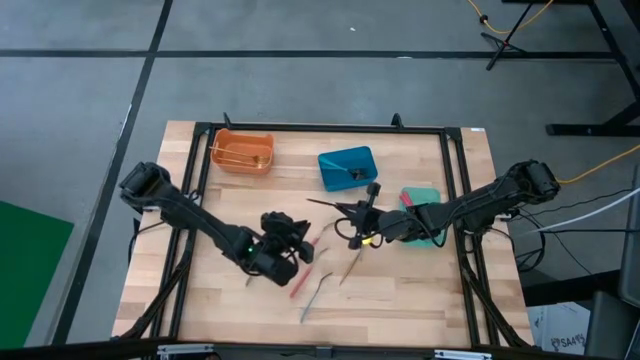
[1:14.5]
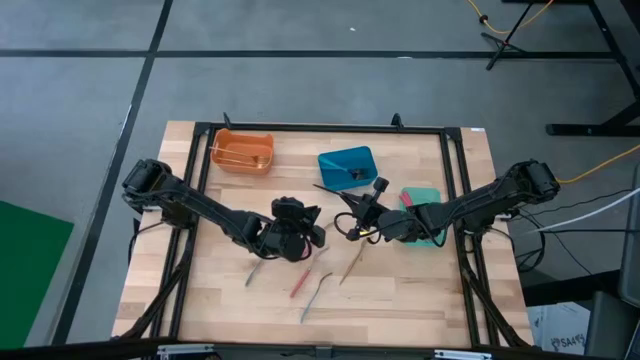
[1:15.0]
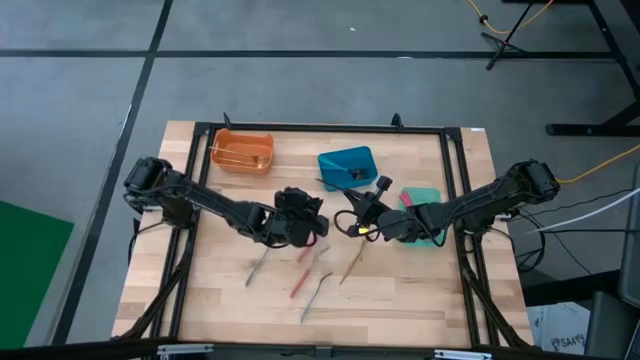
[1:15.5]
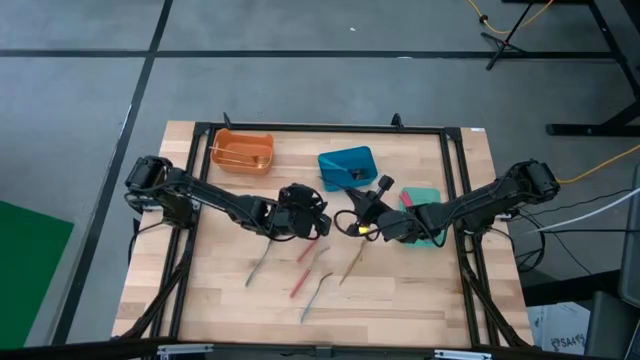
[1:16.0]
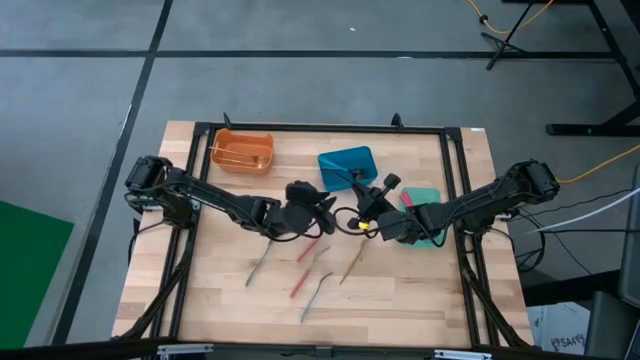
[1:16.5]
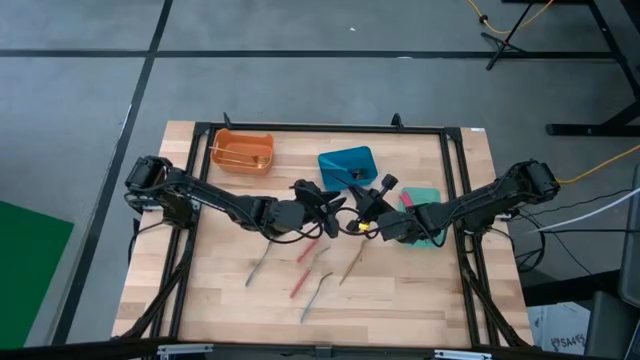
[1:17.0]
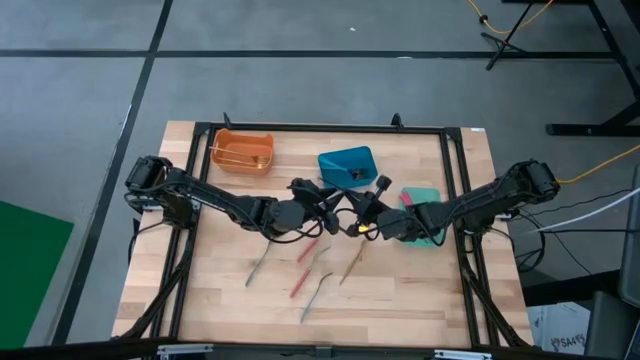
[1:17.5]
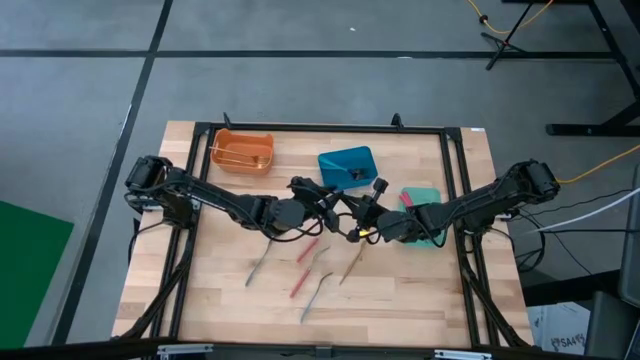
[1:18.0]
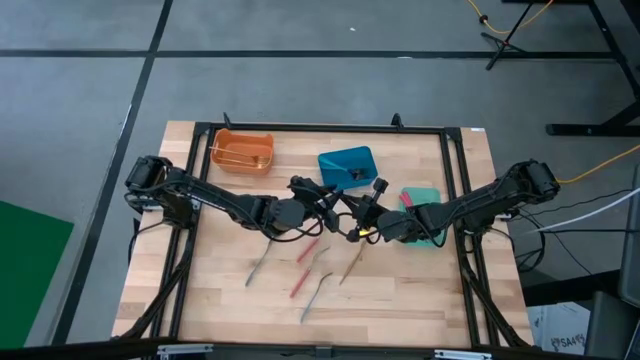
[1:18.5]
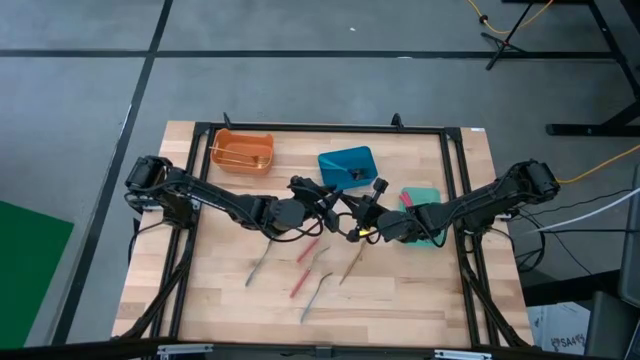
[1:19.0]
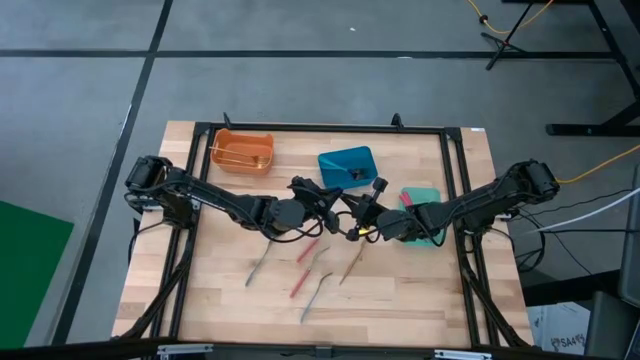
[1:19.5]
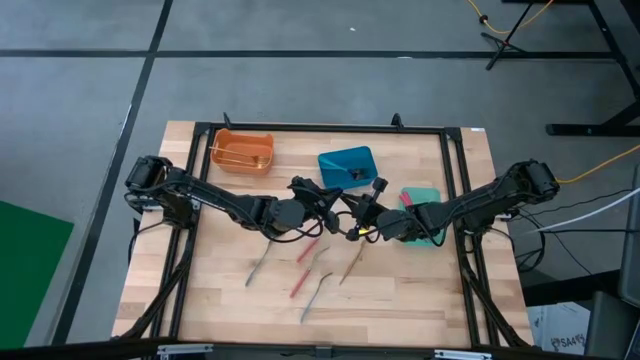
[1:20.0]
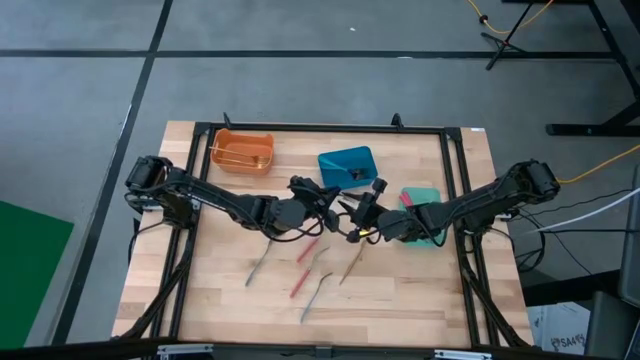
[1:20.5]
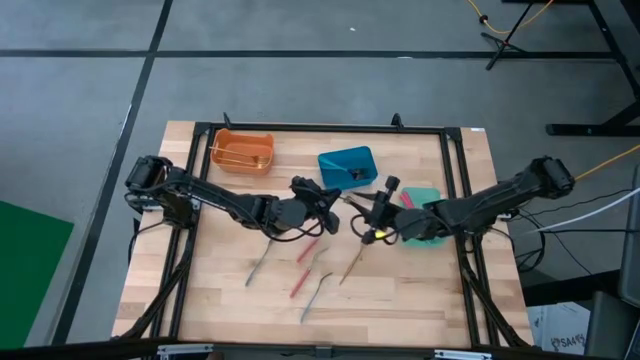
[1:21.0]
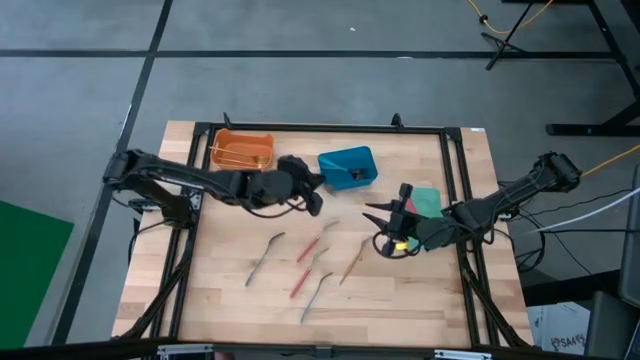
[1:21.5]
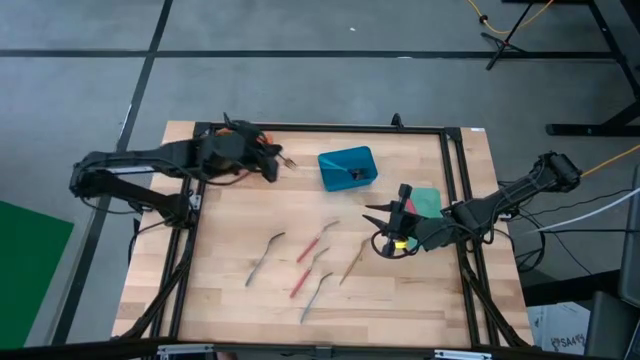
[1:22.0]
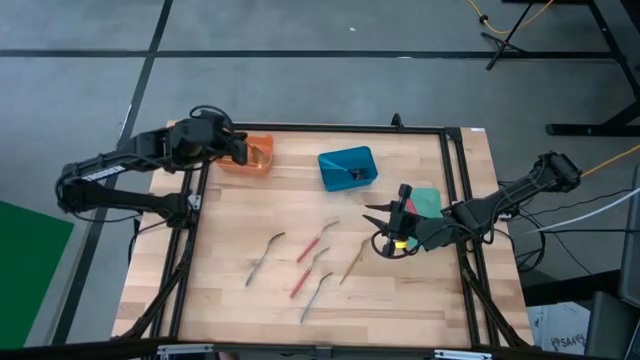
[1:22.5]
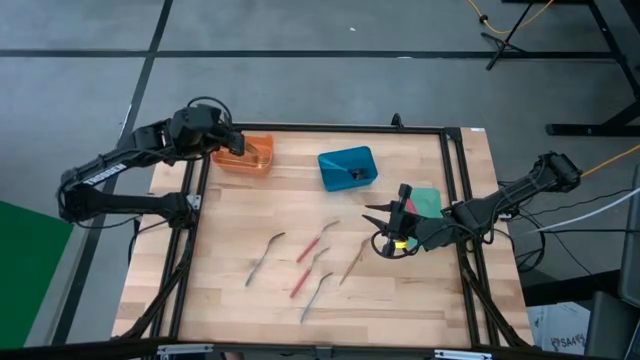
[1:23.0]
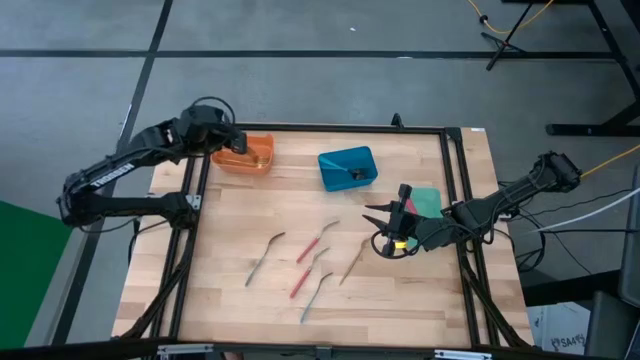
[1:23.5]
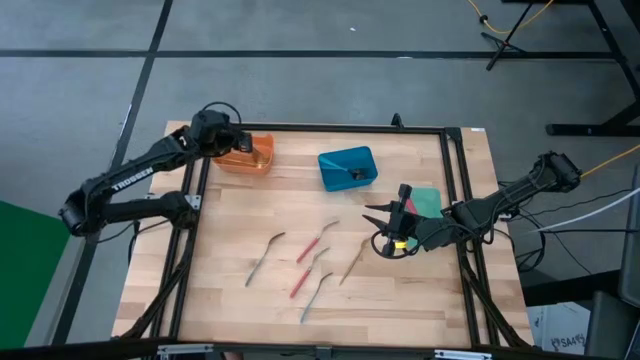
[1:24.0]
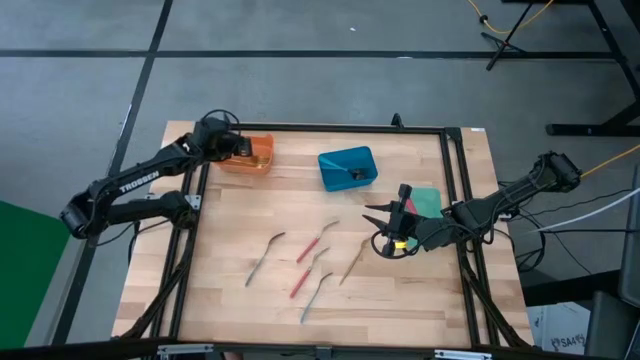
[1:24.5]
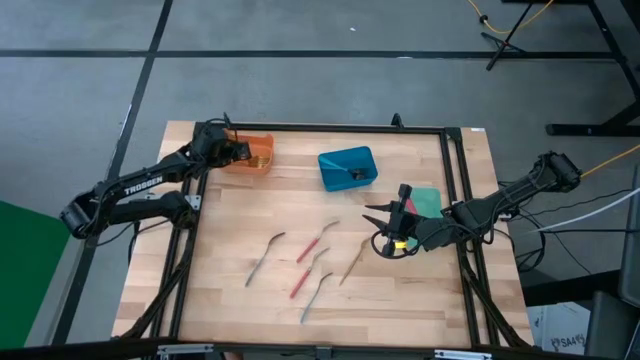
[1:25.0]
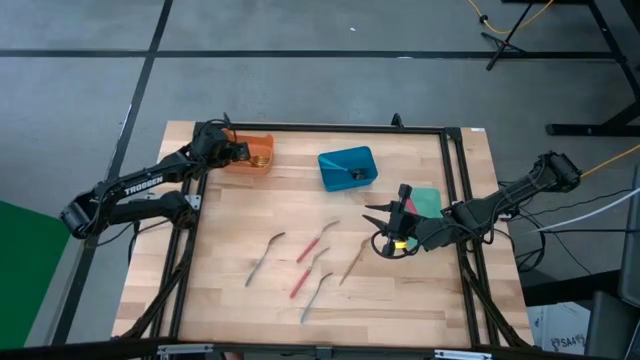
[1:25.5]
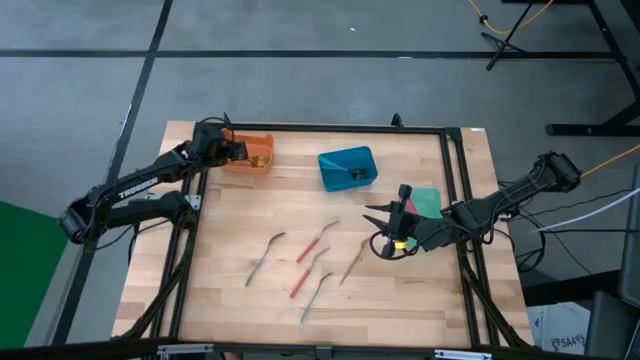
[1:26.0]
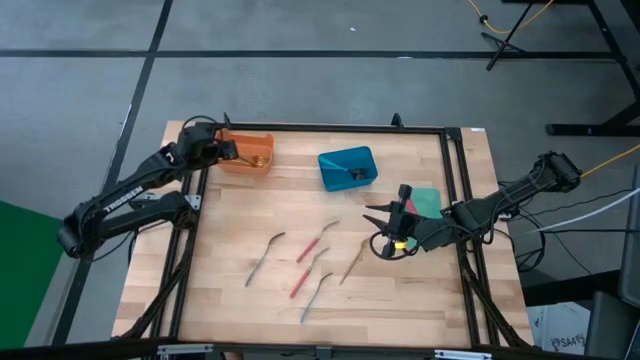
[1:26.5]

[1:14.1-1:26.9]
Task: Sort silverware by color (type)
Put the gold fork into the orange bin

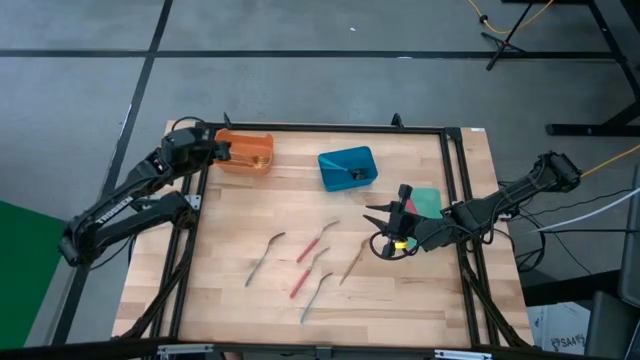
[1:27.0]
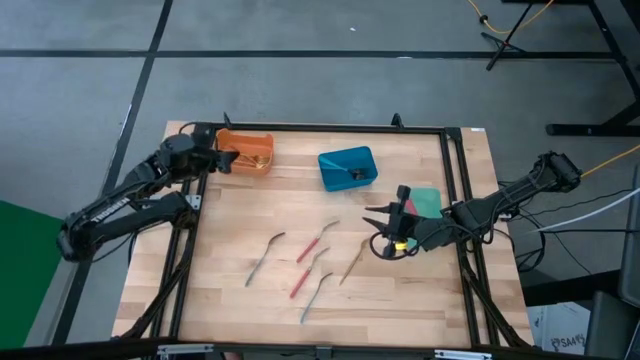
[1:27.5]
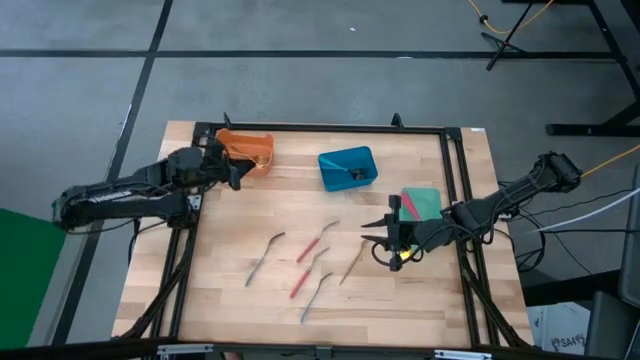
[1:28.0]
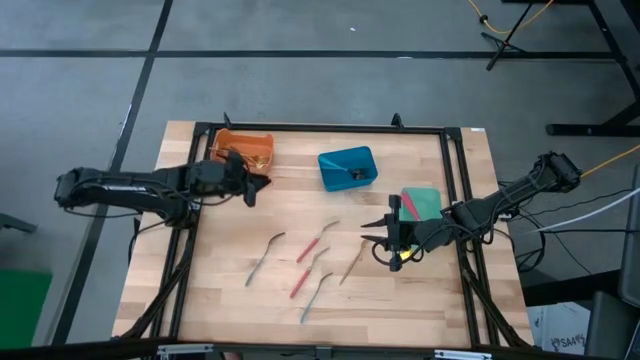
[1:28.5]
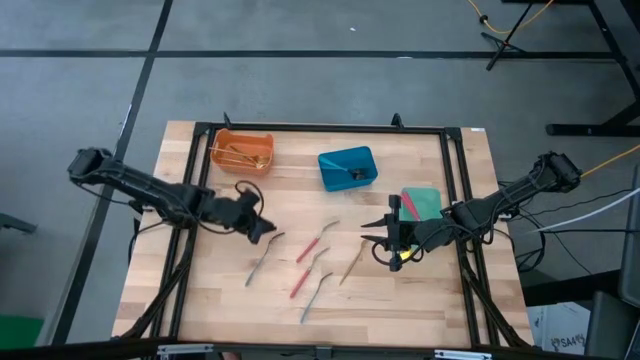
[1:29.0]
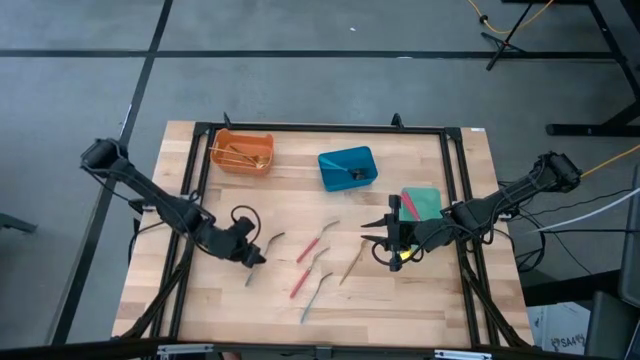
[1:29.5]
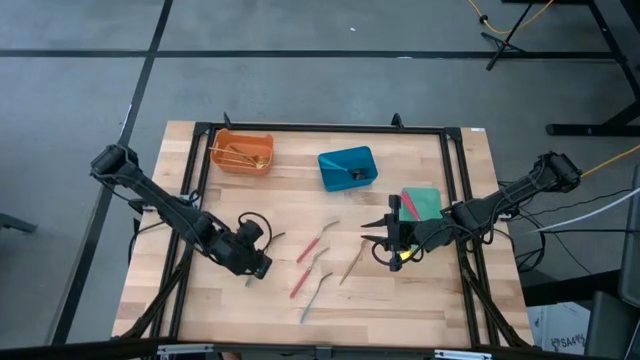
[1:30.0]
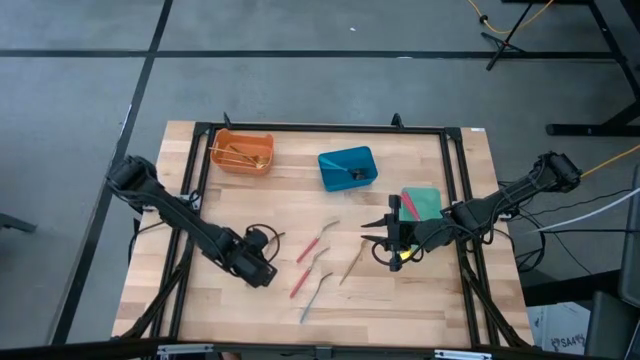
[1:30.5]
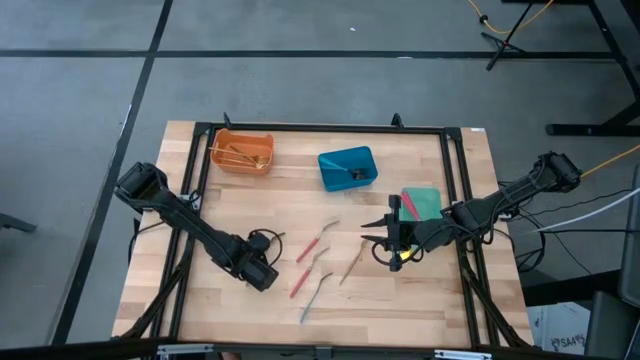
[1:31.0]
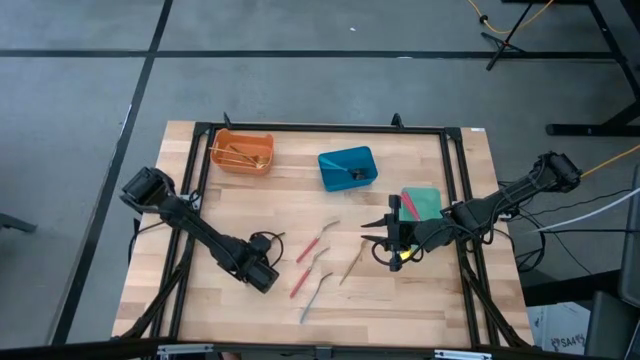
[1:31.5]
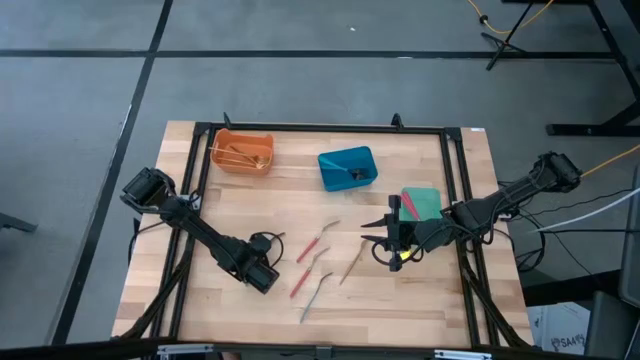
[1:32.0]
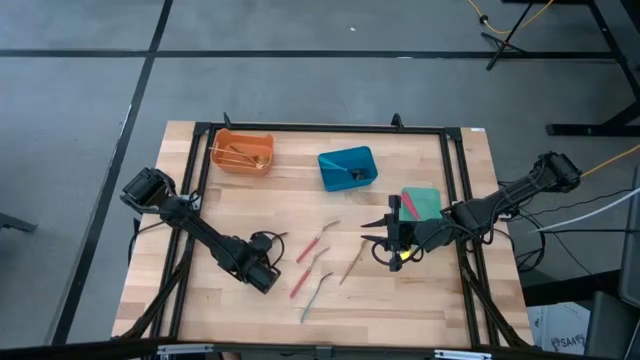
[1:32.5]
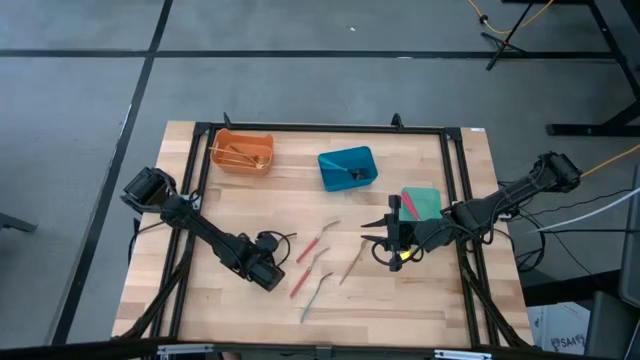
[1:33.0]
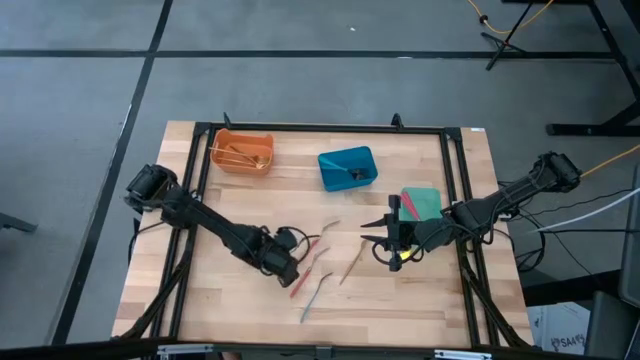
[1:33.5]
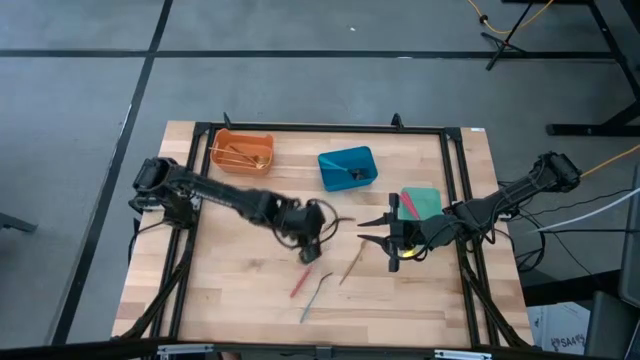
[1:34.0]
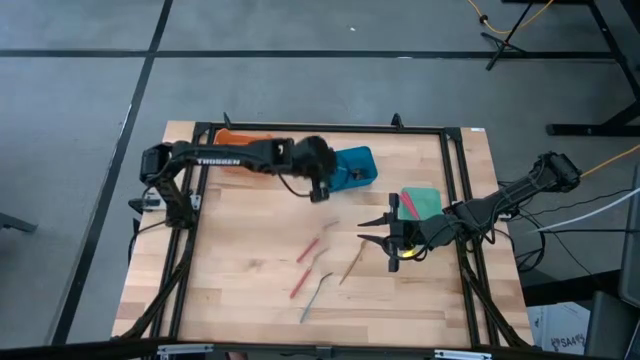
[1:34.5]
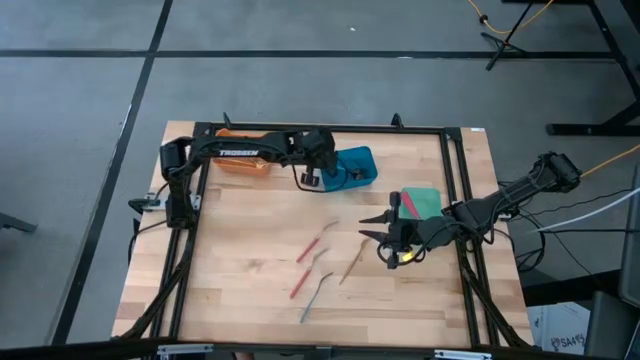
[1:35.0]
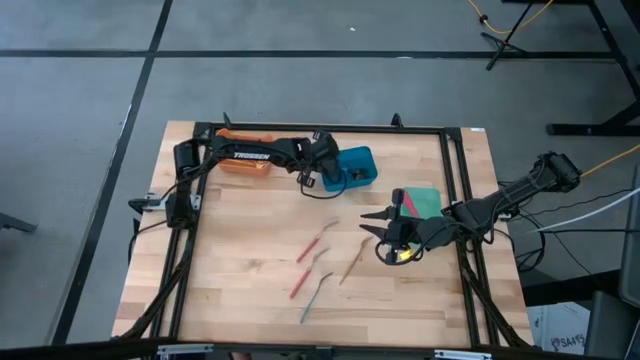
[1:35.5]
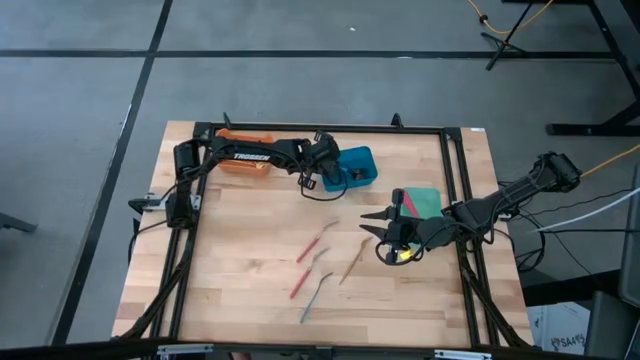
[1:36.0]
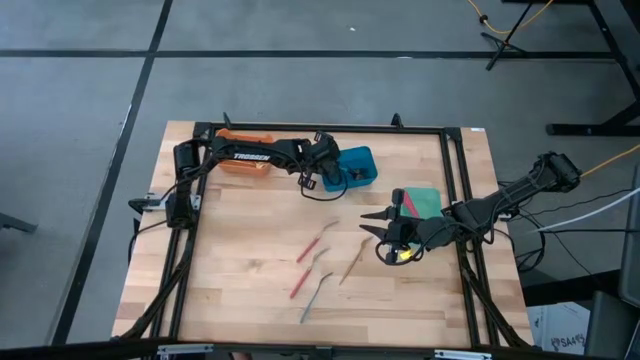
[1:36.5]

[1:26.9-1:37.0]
Put the blue fork into the blue bin
